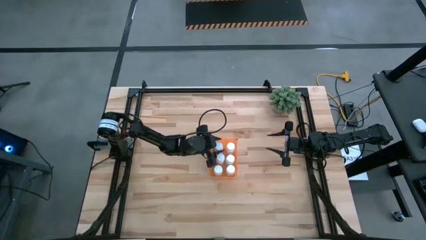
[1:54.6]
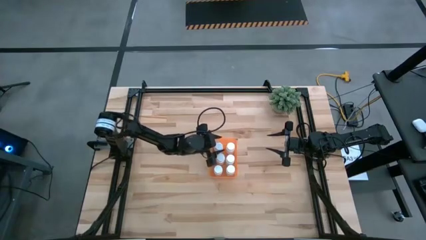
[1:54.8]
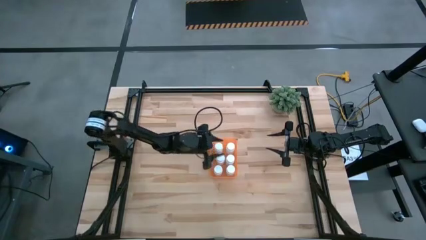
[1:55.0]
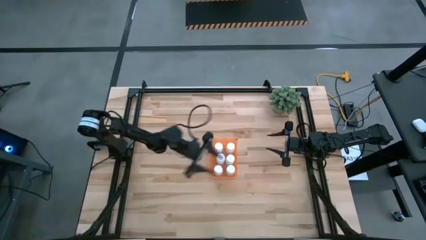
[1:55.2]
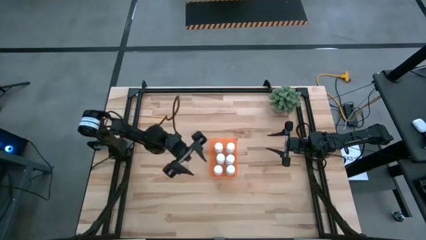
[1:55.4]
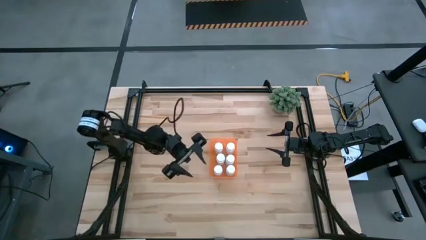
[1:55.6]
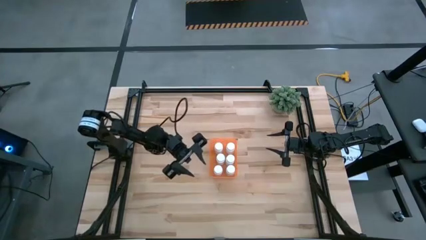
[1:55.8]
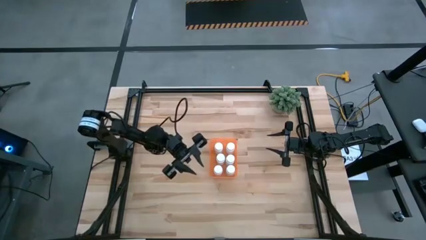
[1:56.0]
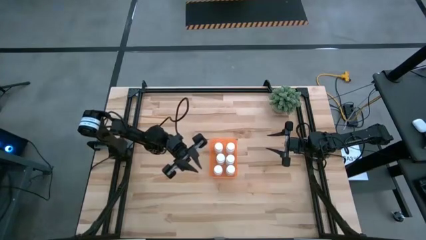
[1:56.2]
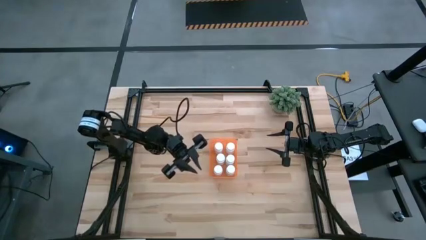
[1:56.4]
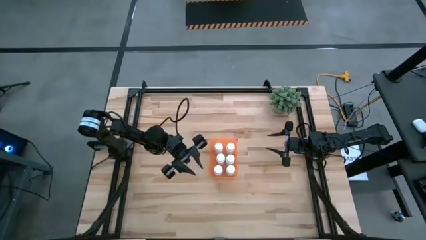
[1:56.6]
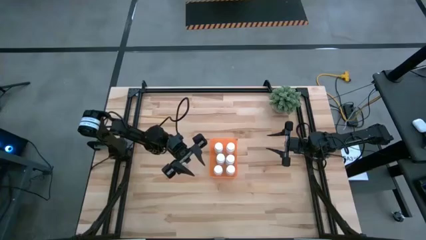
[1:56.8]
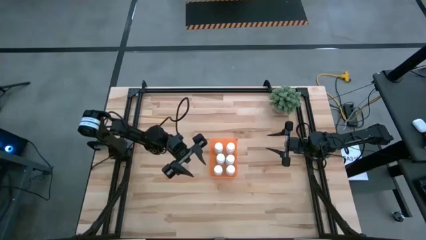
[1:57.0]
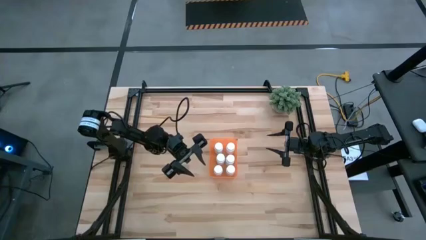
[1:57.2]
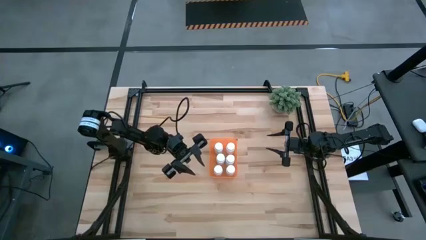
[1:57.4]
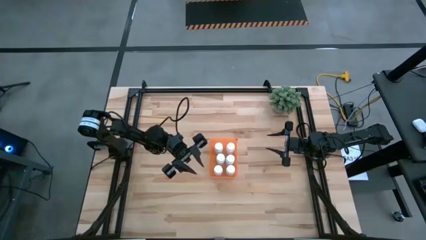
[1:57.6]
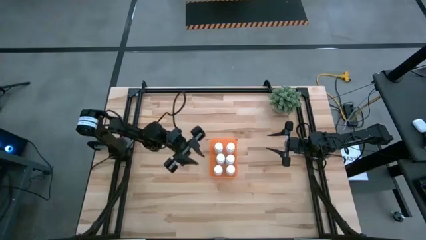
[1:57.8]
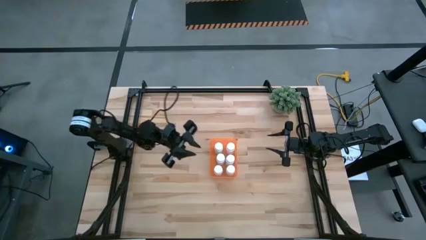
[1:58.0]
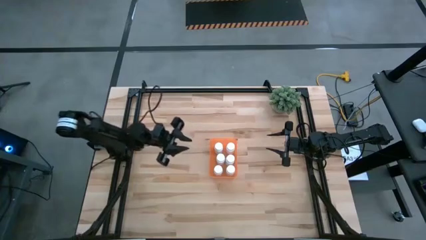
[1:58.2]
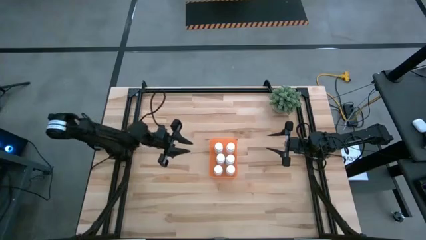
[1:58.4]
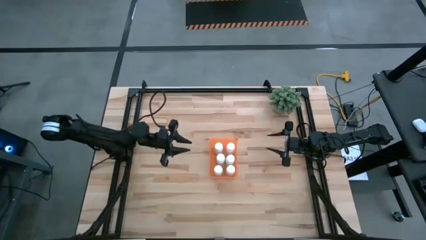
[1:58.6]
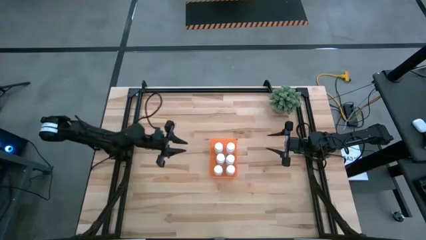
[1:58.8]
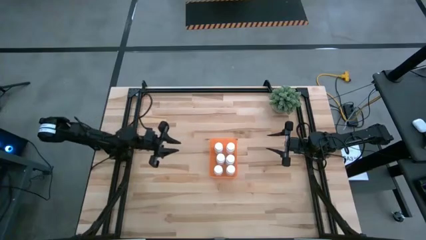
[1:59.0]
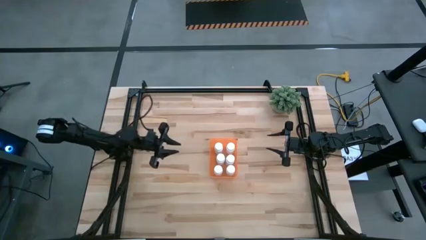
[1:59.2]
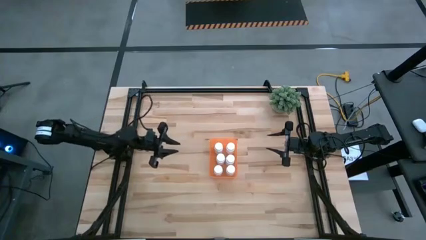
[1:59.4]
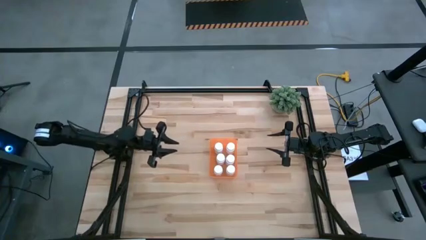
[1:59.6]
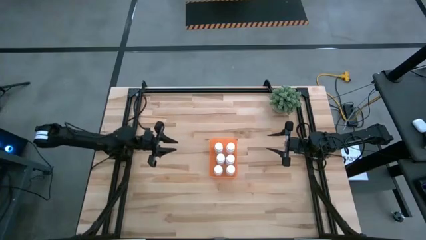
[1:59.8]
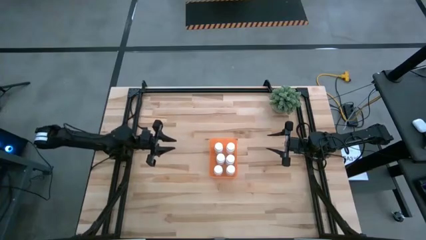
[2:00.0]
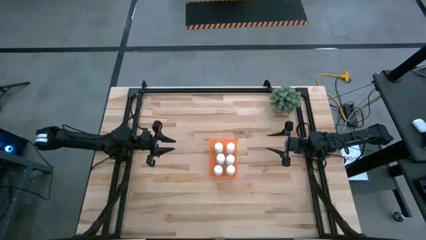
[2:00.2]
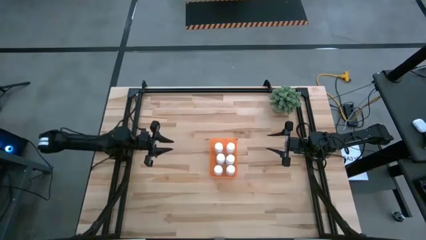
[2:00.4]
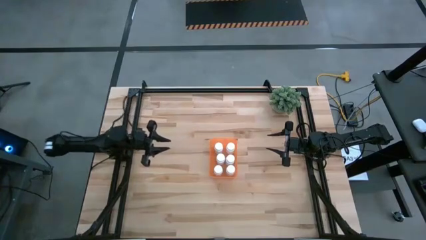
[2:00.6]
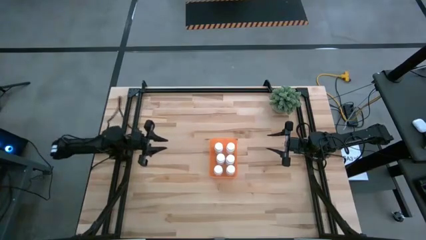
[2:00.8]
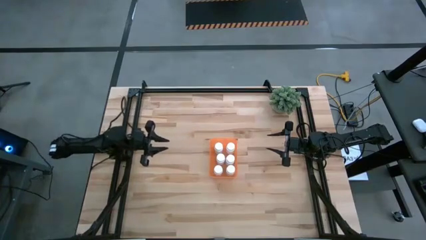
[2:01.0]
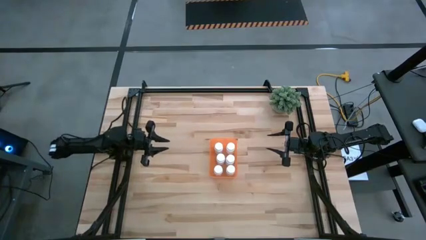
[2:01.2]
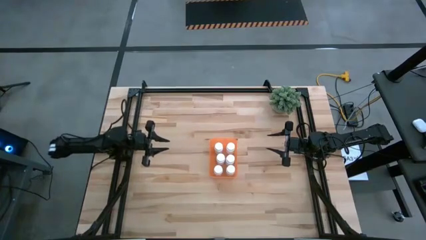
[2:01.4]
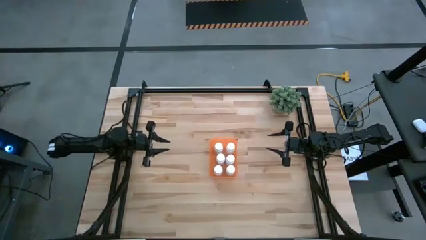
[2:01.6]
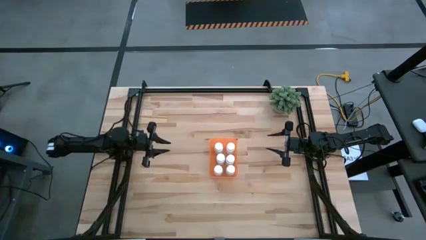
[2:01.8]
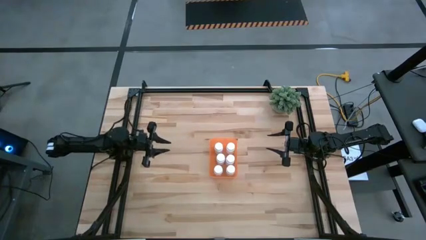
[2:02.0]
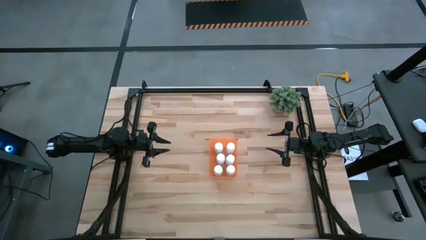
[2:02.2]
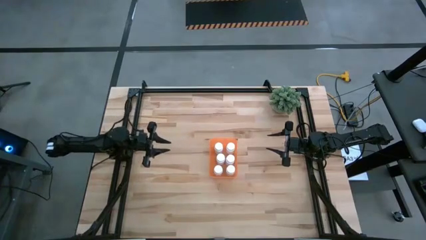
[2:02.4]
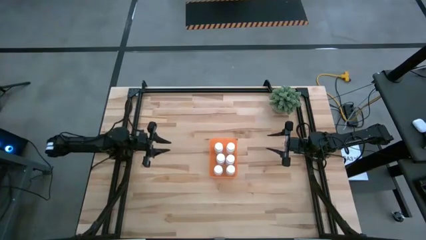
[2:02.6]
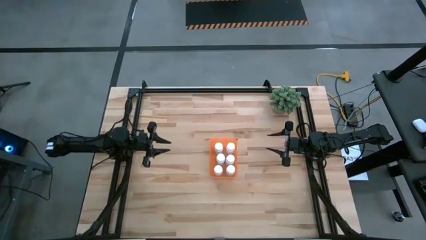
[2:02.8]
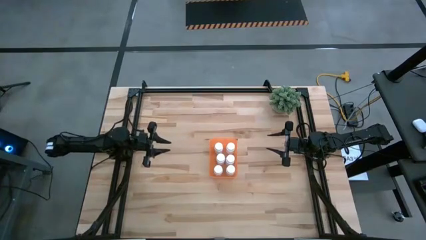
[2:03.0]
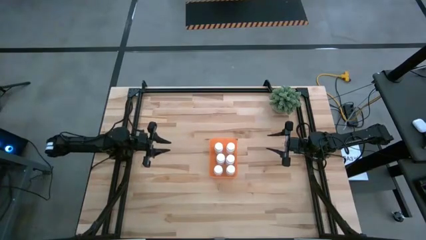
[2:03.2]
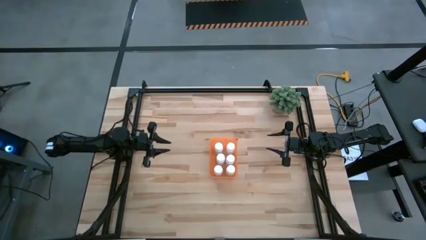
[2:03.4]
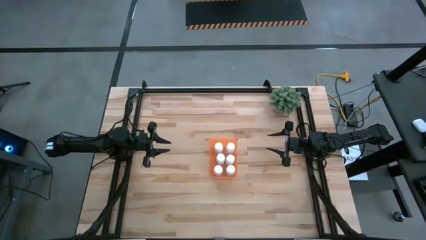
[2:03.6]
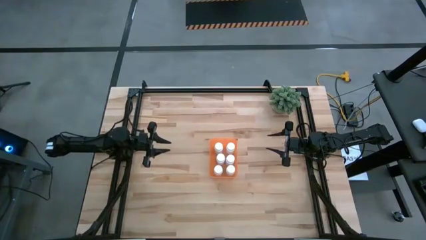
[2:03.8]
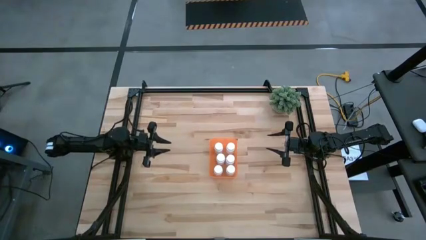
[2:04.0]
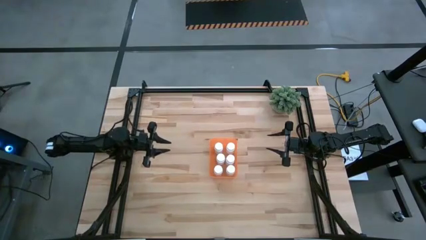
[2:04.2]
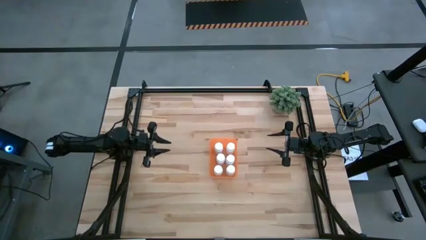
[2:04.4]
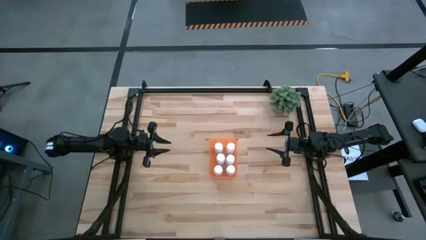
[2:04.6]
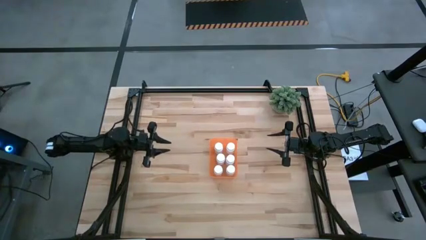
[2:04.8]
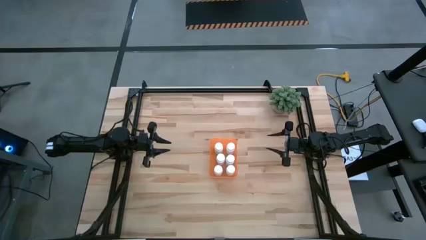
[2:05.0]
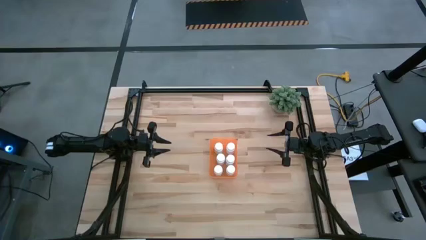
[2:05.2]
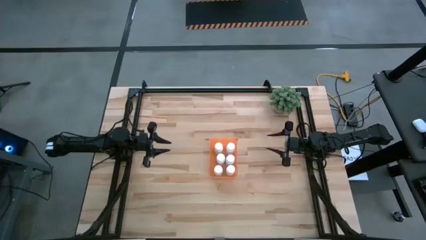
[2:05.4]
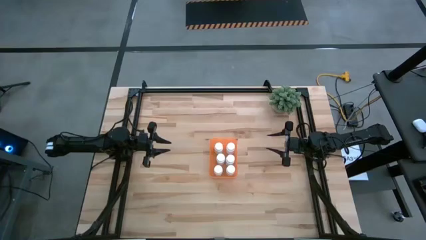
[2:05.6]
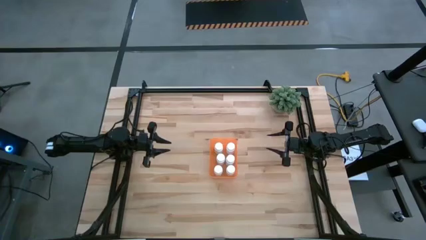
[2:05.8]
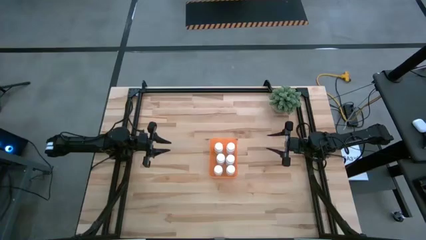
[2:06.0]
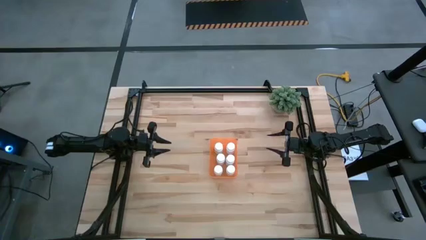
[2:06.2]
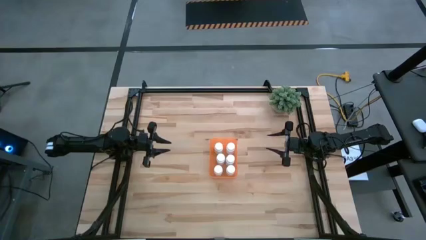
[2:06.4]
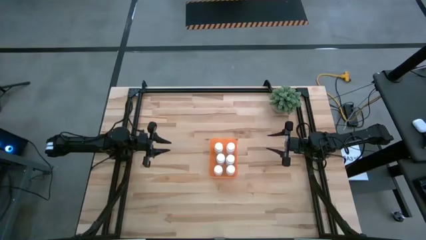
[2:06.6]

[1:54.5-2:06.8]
Task: Pick and place pill bottles into a basket
Return to Home Position

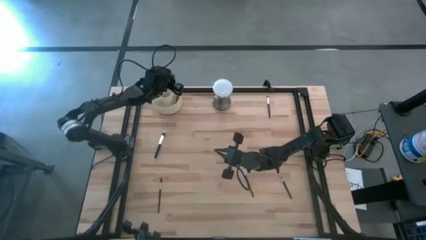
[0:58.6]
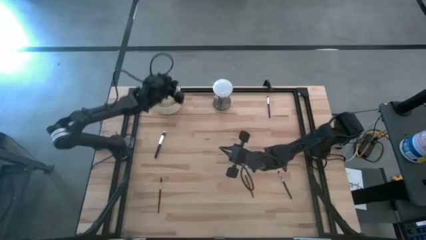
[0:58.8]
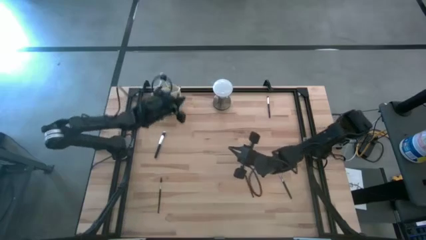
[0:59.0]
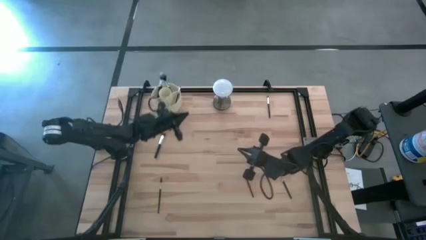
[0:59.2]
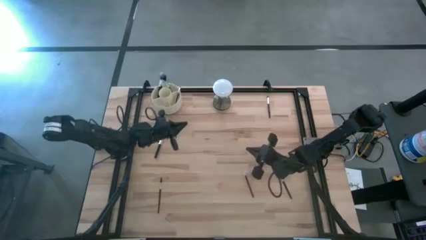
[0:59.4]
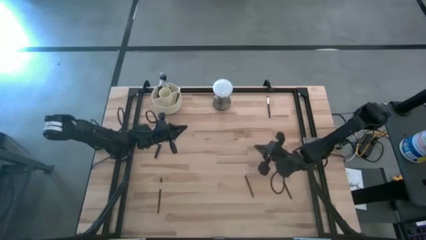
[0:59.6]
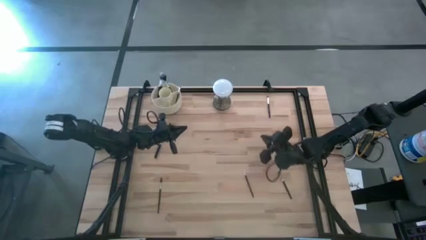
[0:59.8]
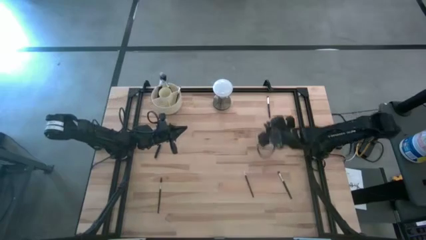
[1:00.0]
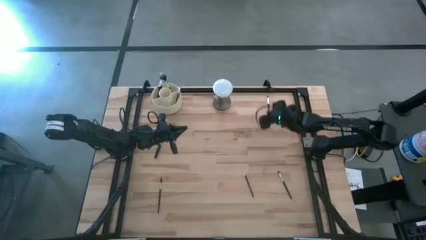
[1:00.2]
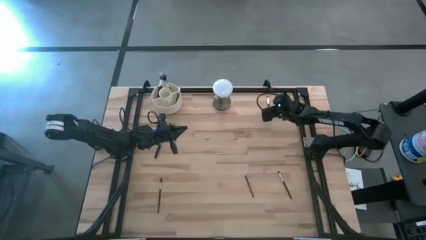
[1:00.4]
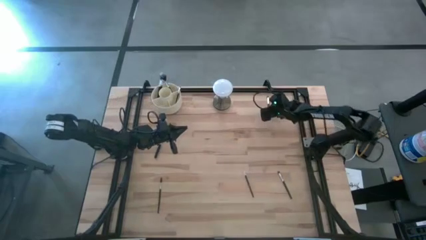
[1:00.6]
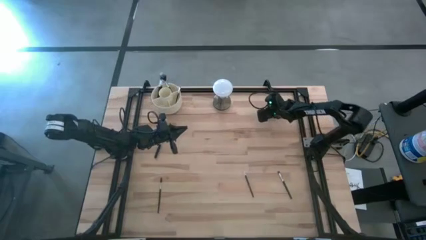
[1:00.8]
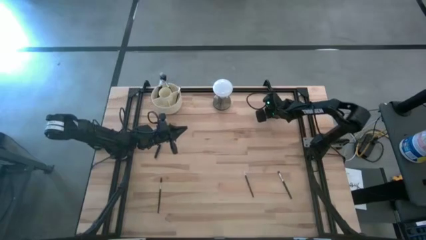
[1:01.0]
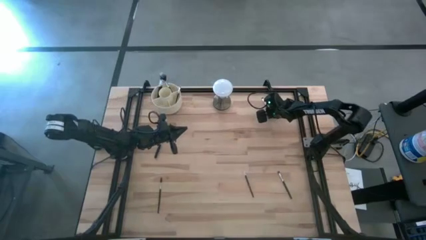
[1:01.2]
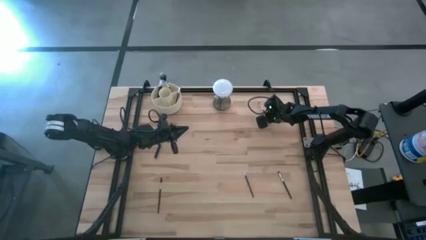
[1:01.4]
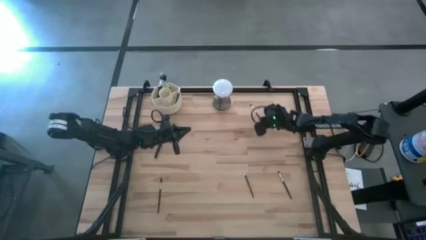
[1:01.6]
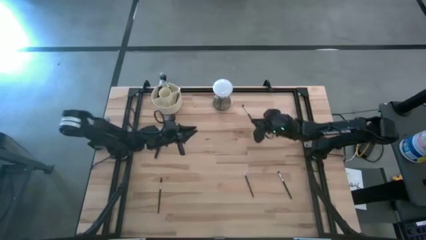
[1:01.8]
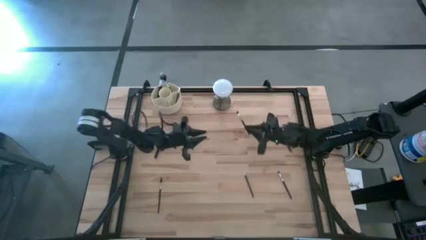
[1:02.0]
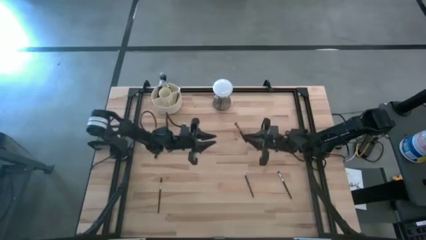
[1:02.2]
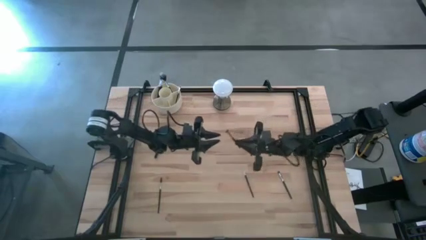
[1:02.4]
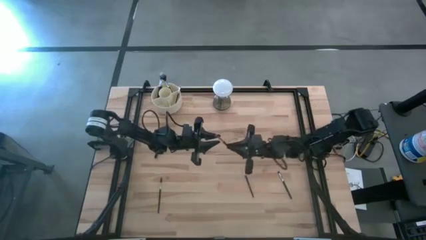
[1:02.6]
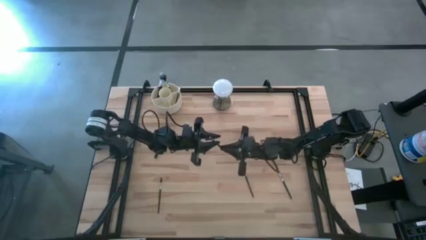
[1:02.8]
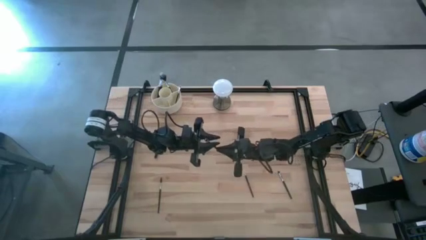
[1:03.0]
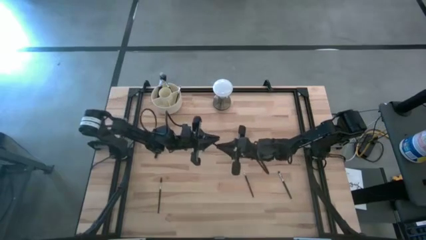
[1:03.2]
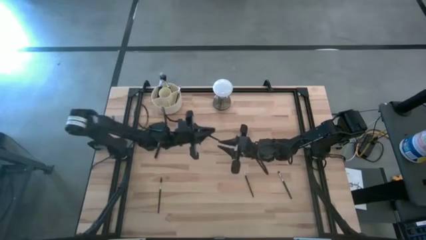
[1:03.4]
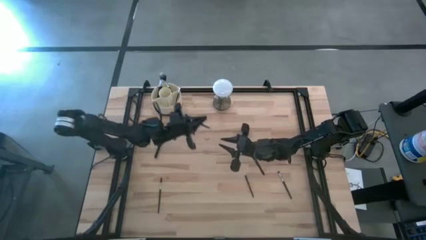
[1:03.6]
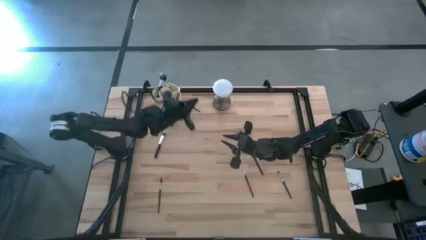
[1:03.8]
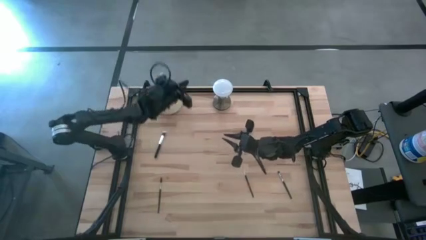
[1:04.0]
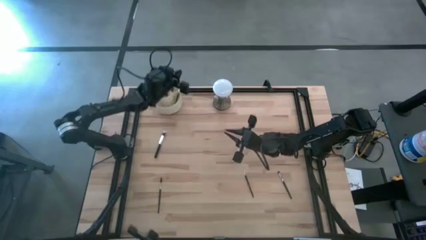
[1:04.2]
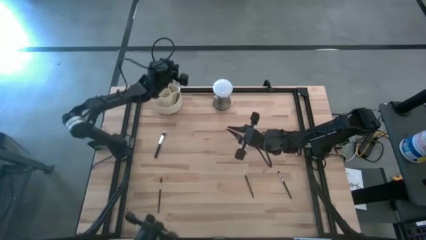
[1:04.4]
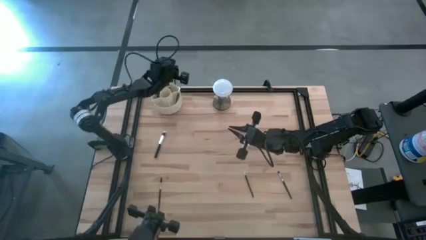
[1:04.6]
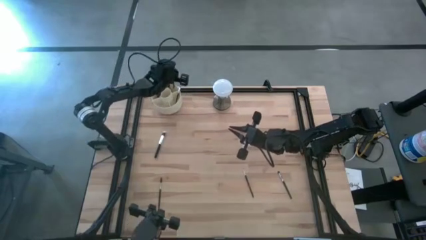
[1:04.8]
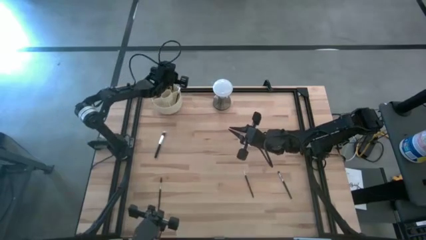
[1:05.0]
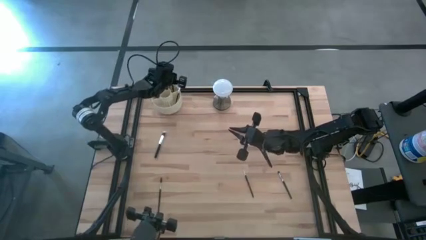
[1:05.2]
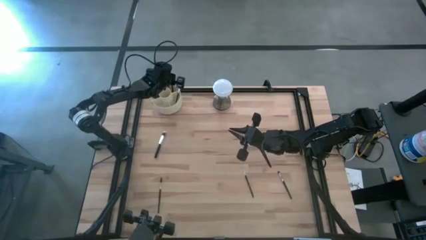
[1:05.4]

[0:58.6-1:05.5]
Task: Put items in baskets/containers
Put the eyeshadow brush into the organizer
